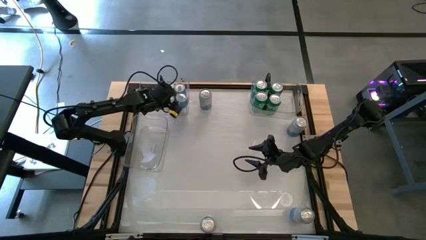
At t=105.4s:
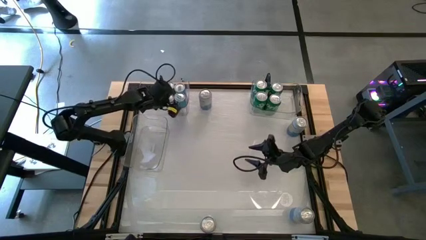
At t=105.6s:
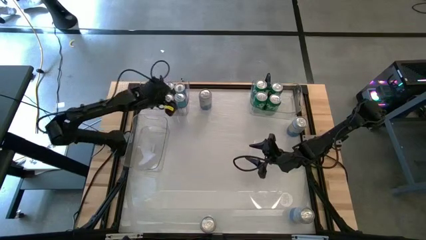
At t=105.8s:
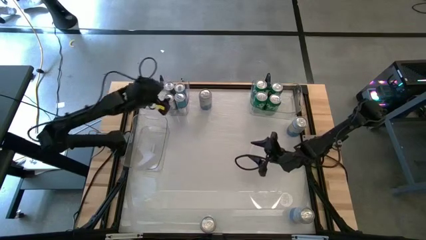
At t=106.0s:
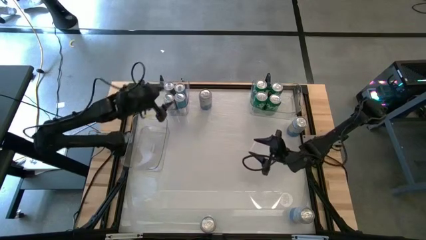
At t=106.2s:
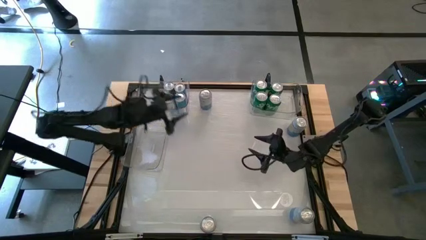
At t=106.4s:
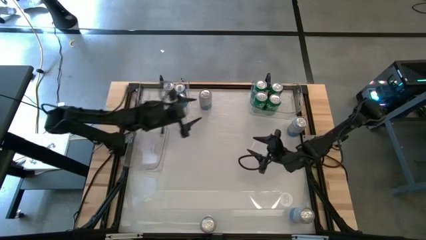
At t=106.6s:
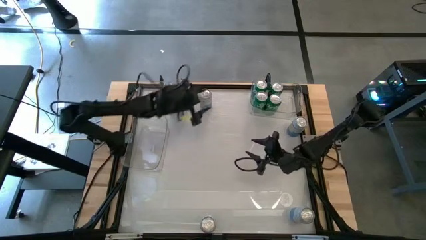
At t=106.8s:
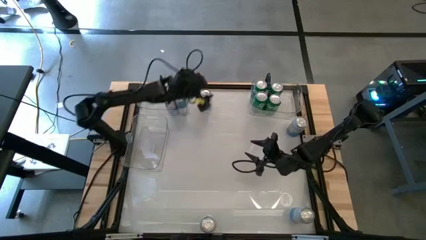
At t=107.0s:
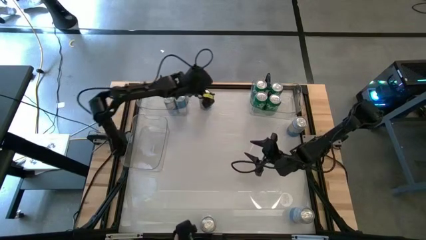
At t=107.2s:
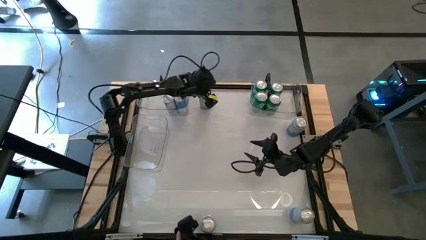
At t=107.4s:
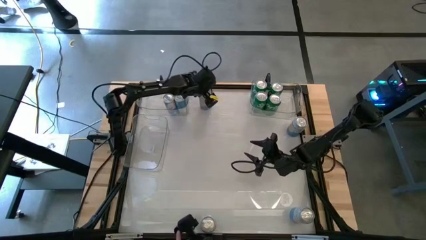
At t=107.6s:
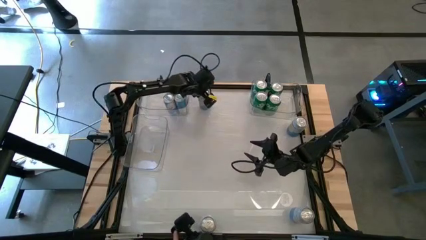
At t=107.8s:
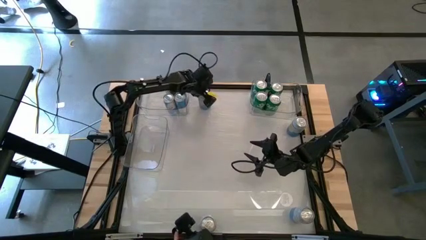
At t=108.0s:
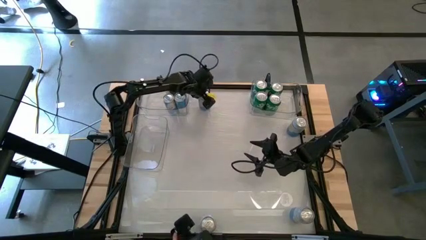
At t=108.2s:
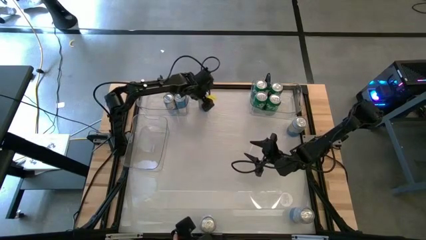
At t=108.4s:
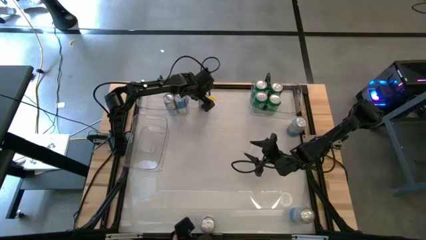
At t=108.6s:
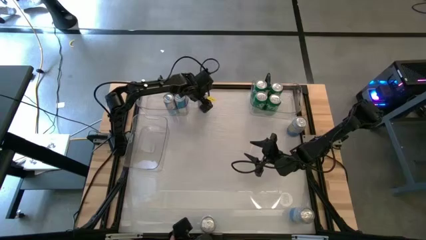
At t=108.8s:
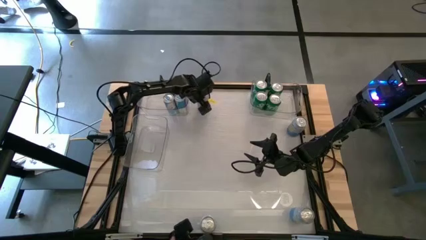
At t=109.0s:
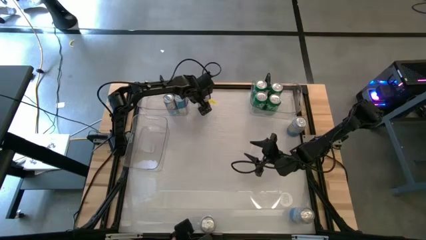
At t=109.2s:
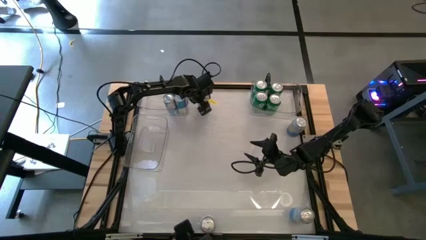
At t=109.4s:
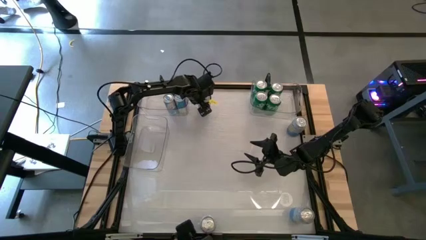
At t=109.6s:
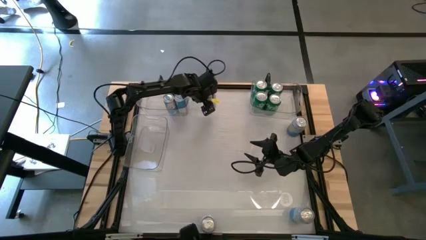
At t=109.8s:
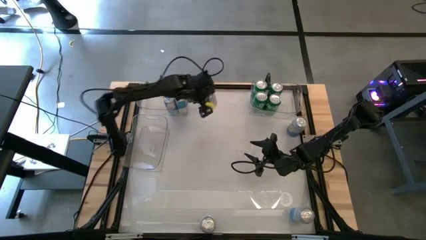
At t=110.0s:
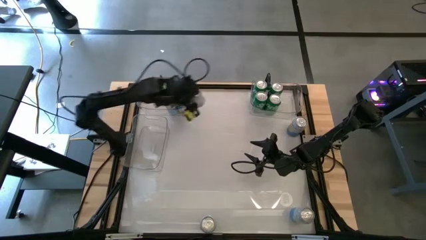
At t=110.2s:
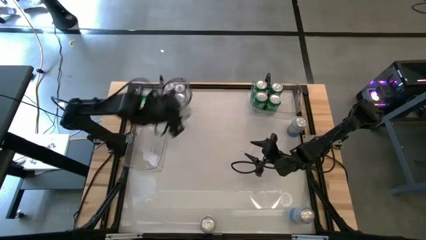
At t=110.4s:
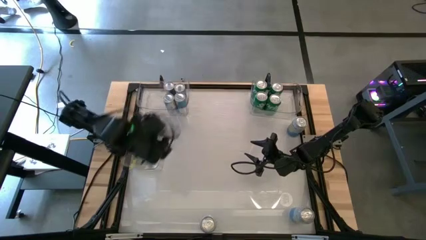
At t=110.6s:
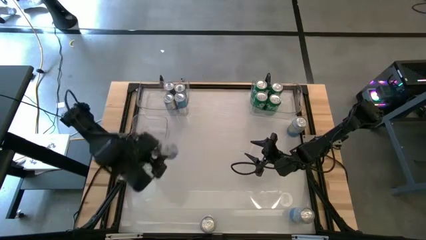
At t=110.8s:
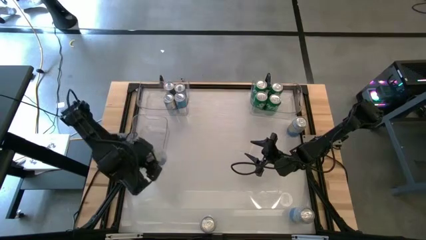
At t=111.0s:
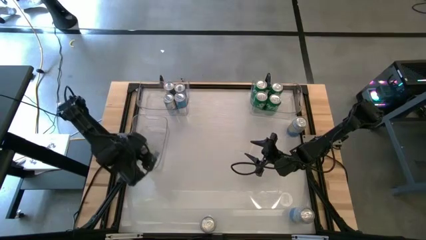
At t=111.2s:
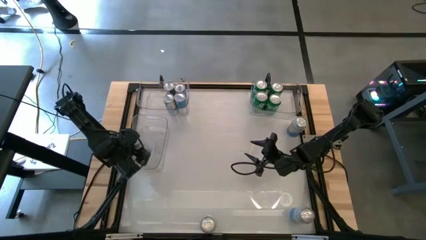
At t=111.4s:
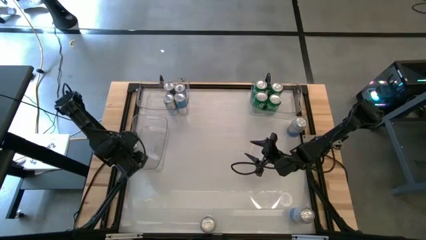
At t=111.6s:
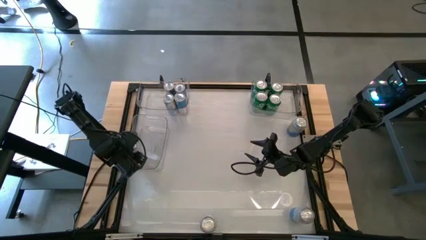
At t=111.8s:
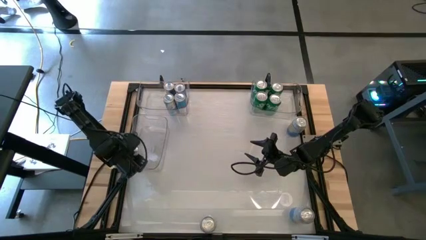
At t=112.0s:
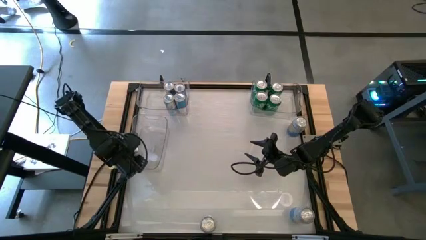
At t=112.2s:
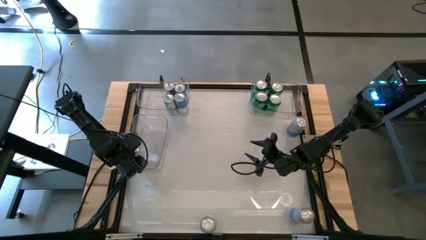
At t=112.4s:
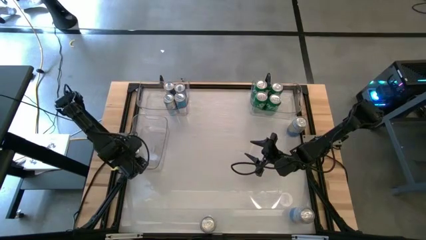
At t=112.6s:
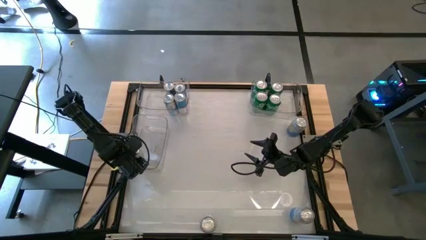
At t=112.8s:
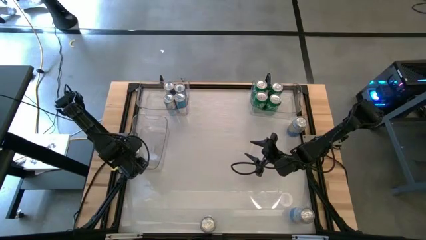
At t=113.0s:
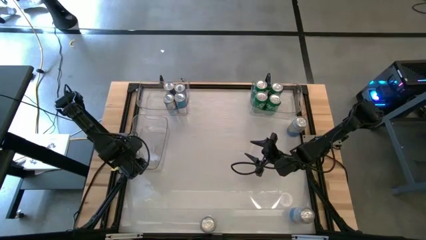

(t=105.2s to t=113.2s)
Task: Sort soda cans
Put the top center blue-white soda can into the middle bottom transparent bin

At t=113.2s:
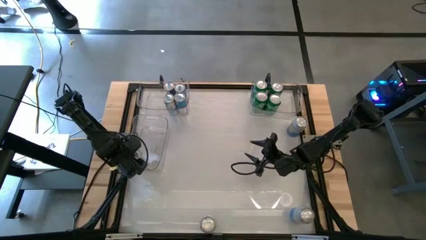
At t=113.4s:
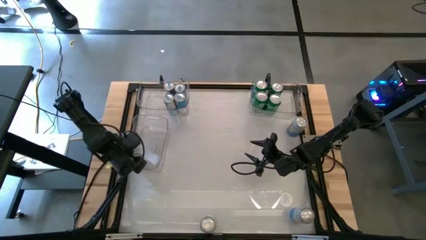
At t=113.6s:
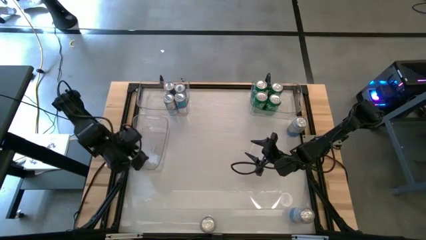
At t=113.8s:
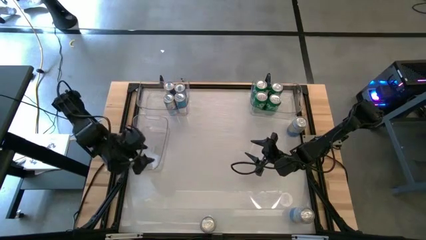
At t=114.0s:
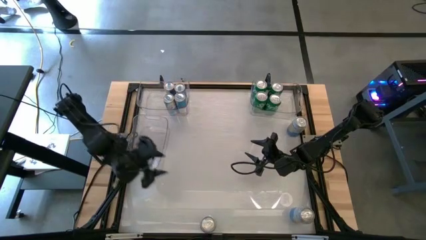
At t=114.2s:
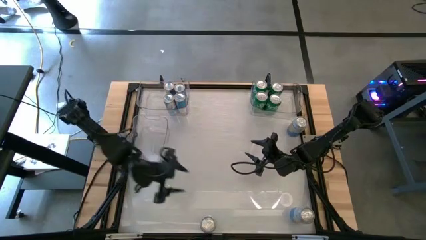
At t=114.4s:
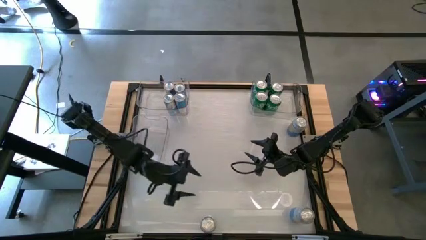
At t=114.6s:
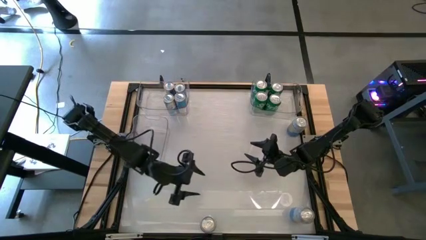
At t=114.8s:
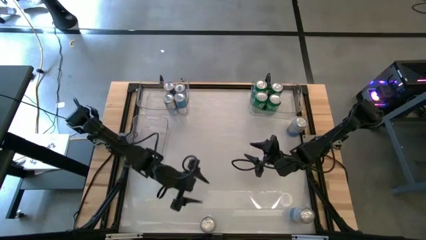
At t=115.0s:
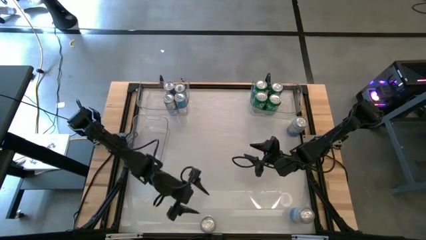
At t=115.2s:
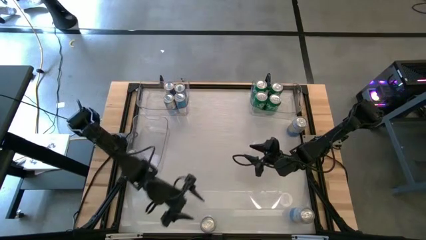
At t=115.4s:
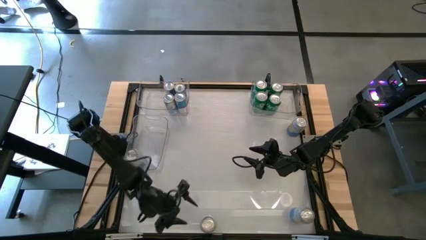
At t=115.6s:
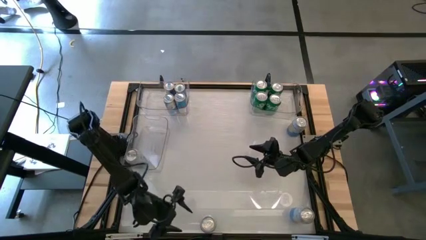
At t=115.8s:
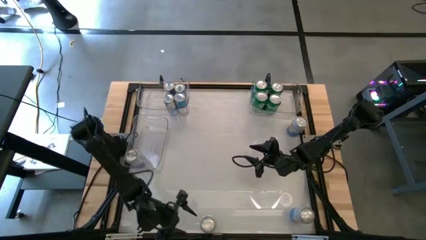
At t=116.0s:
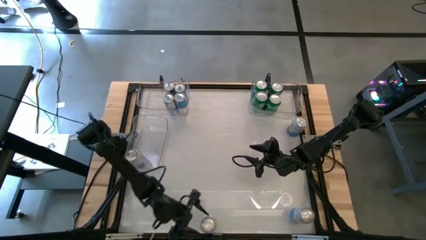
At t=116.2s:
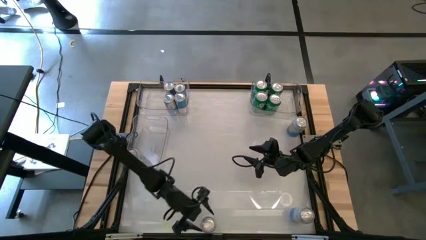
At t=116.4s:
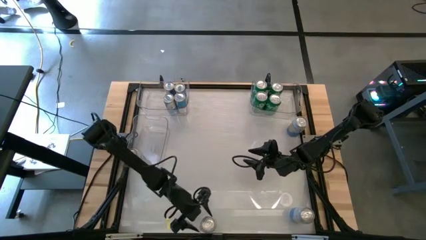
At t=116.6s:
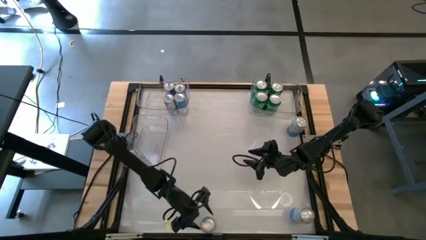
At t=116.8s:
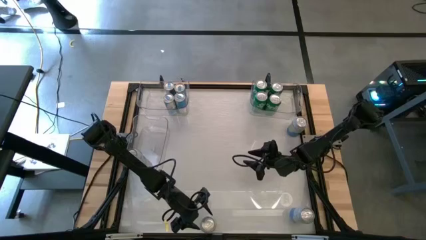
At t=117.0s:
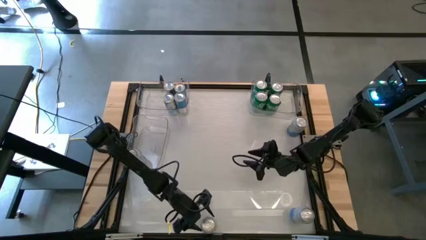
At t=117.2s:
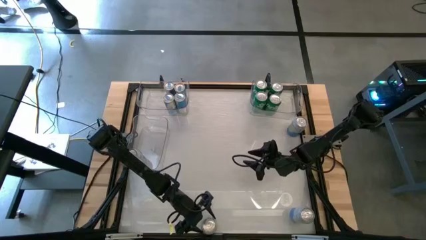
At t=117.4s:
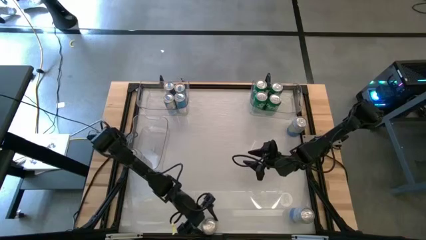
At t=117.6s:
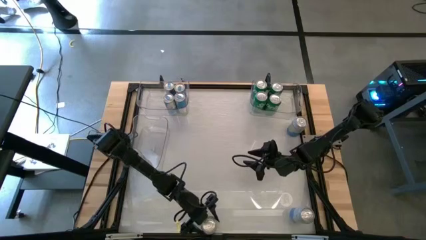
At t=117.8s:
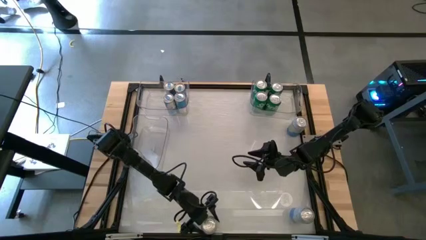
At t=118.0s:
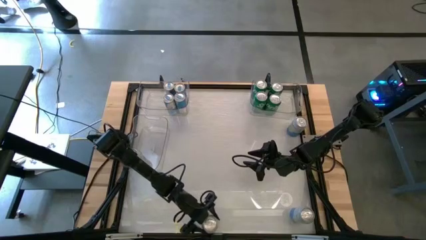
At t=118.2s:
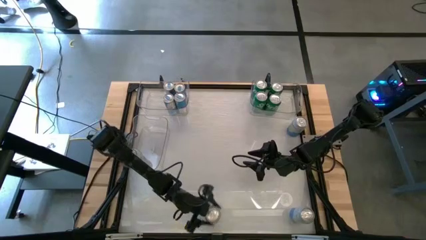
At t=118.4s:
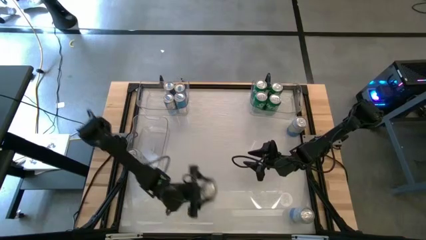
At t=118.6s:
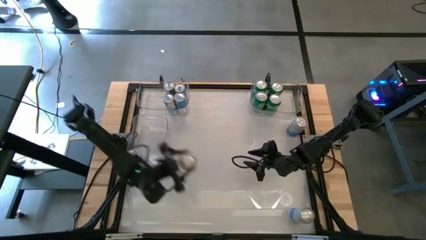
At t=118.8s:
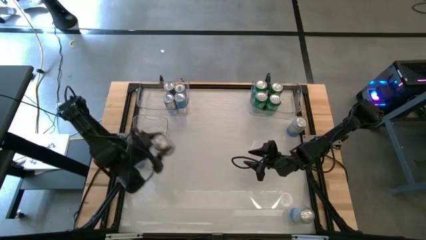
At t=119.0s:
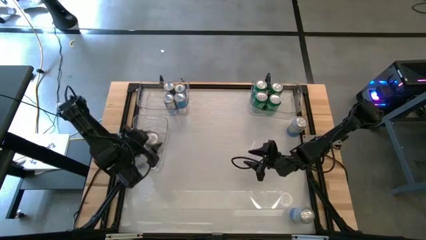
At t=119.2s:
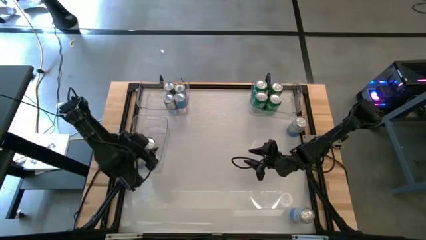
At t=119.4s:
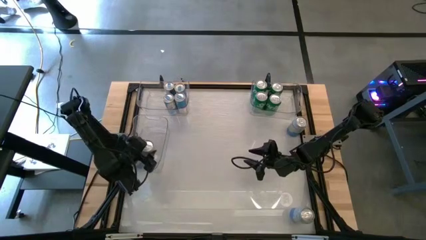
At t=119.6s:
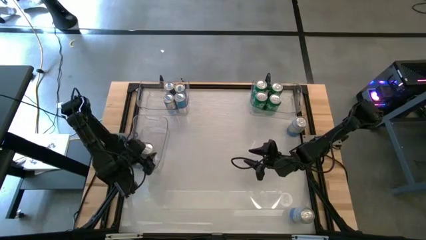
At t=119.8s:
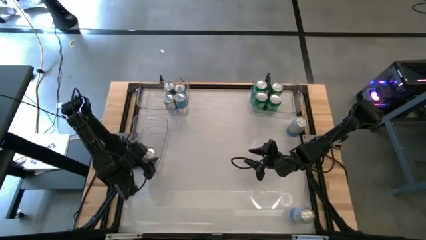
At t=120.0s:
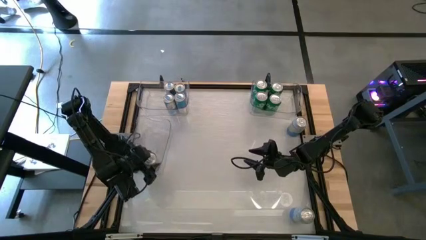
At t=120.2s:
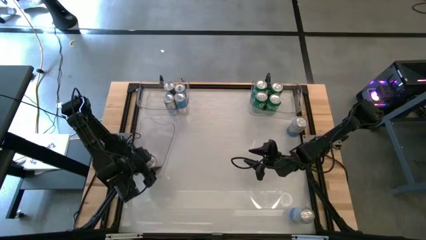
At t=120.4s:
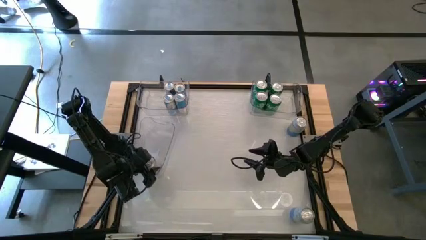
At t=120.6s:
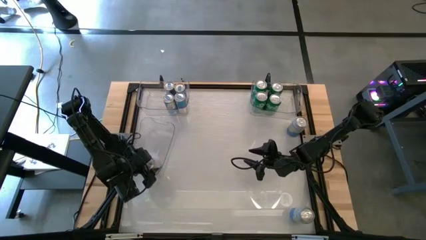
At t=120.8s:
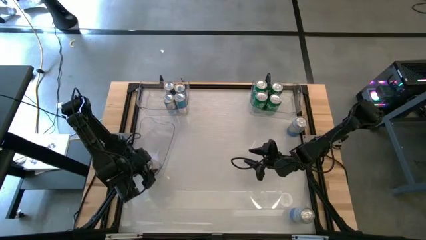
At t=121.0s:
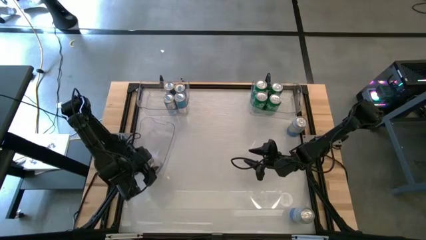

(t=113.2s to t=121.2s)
Put the bottom center blue-white soda can into the middle bottom transparent bin

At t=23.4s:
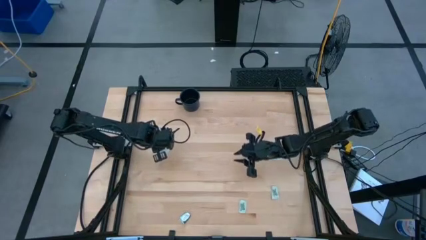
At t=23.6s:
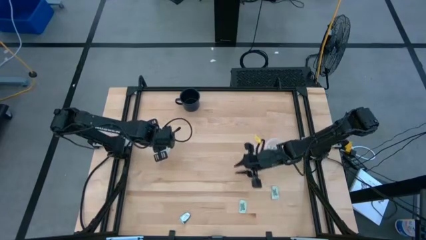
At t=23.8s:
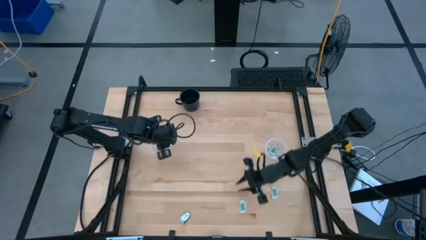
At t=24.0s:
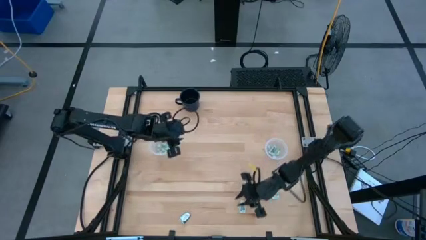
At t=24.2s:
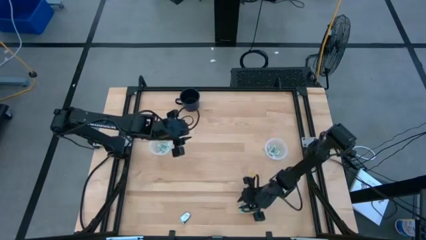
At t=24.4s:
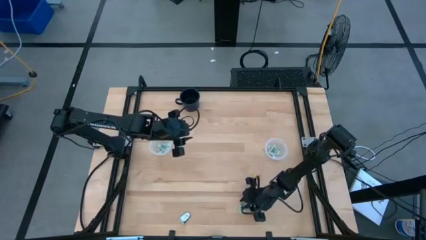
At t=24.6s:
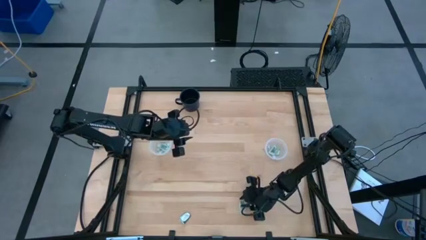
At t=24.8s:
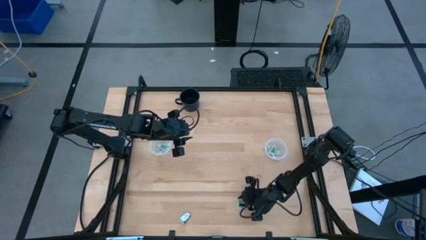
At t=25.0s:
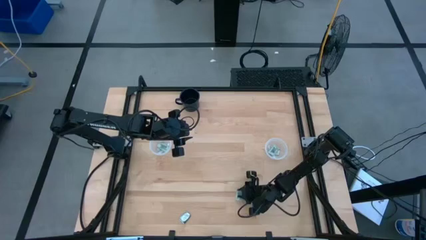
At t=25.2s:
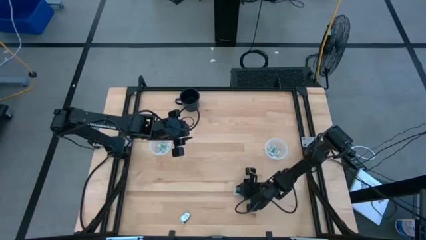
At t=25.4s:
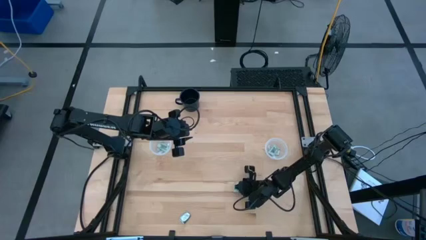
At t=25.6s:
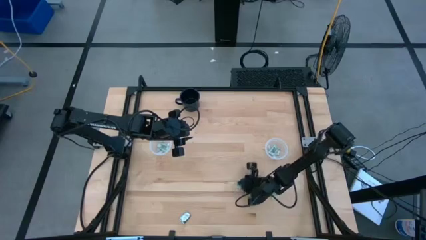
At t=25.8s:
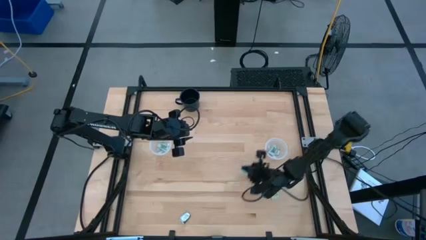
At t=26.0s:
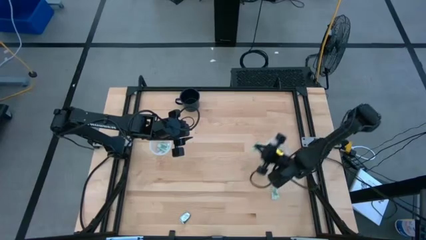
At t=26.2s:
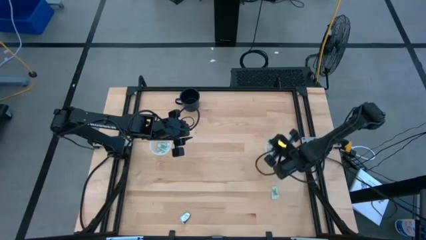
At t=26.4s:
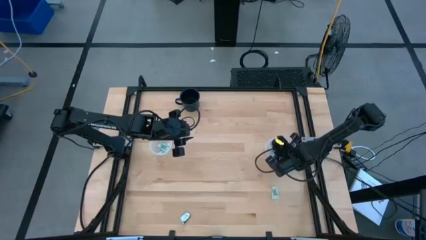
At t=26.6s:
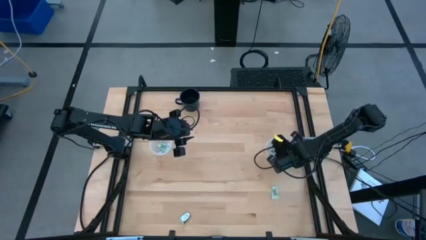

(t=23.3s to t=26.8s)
Task: Pick and place Stevia / Truvia into bins
Put the stevia packet into the right container
